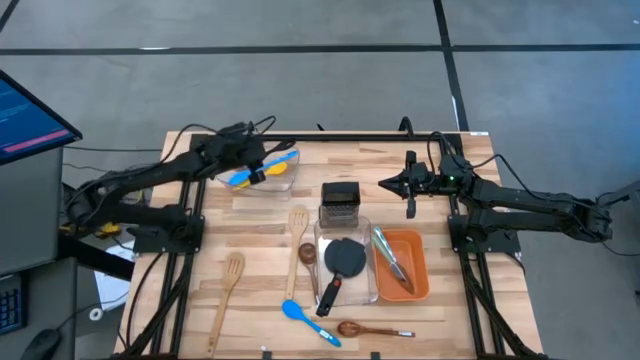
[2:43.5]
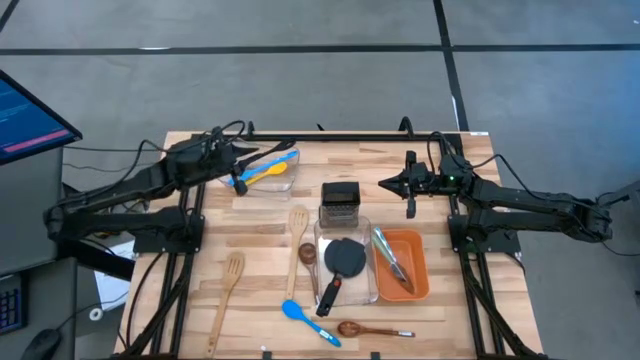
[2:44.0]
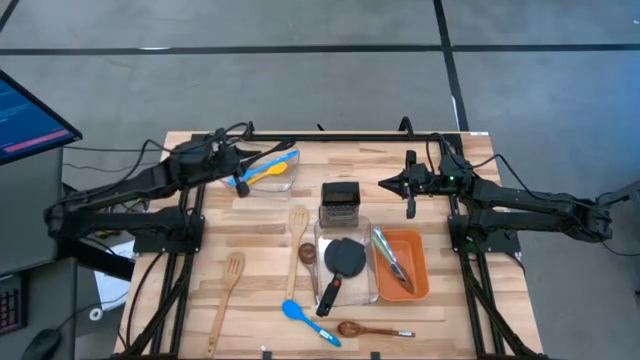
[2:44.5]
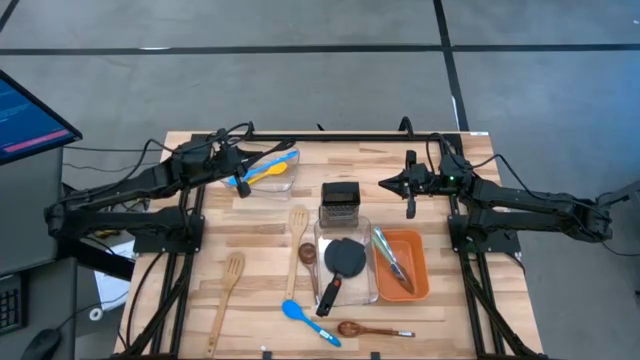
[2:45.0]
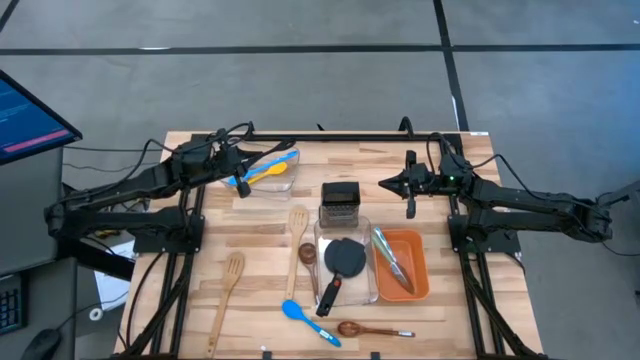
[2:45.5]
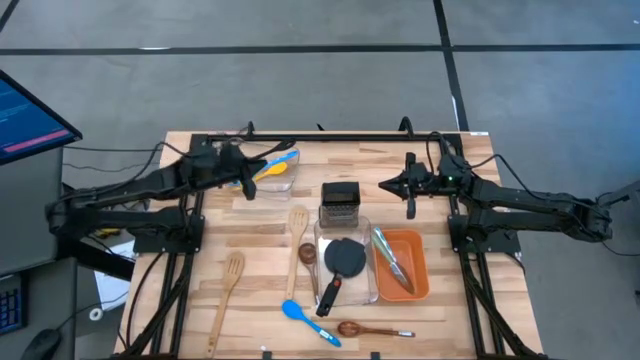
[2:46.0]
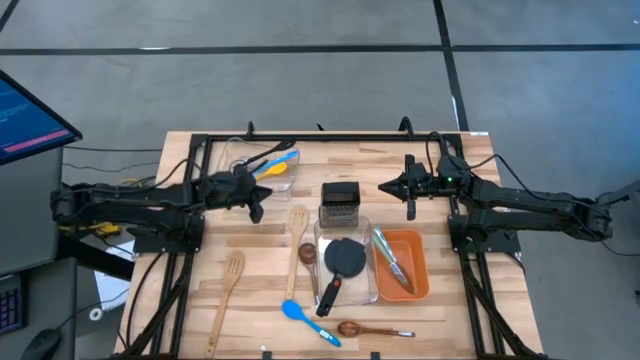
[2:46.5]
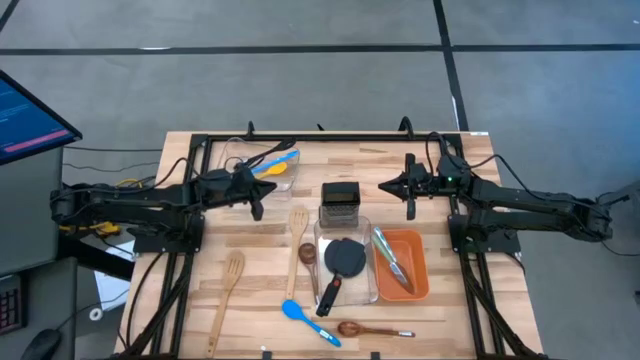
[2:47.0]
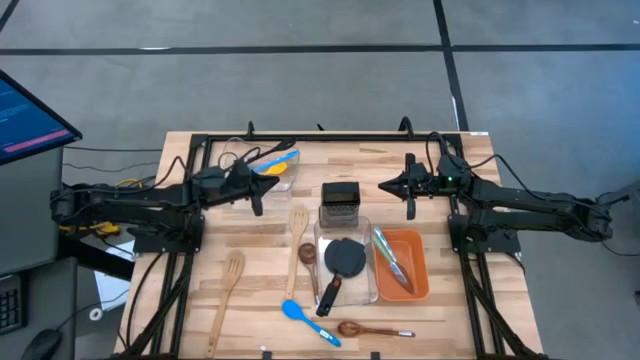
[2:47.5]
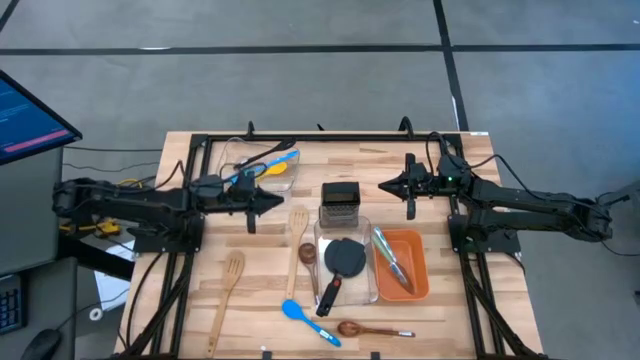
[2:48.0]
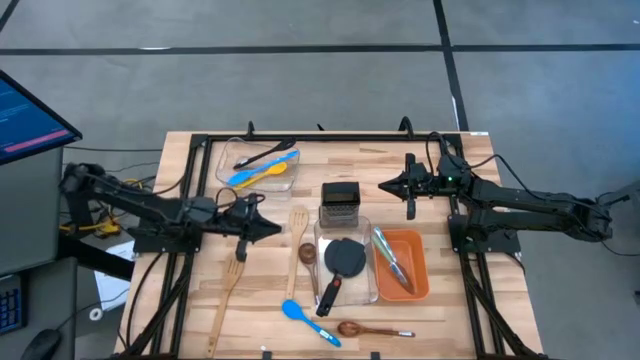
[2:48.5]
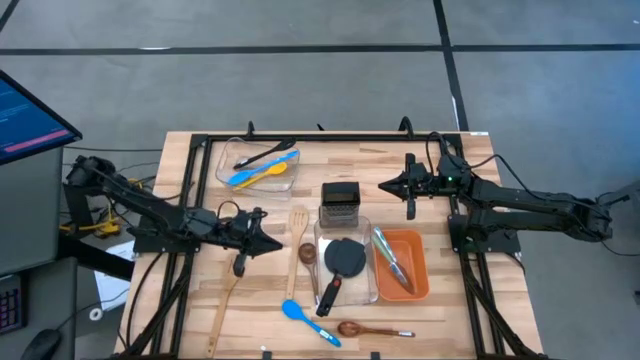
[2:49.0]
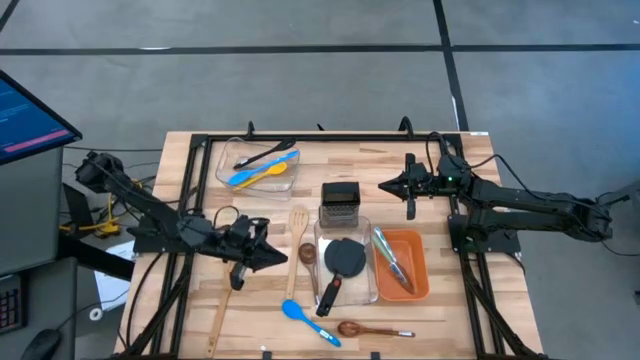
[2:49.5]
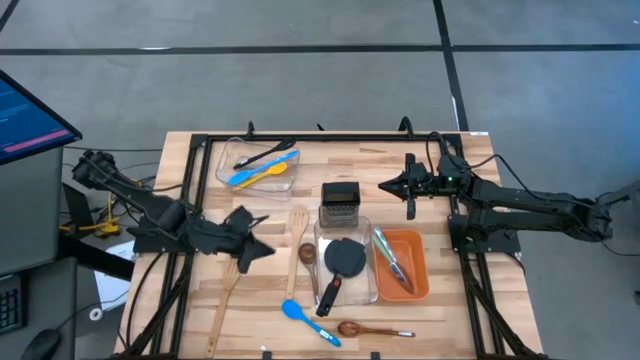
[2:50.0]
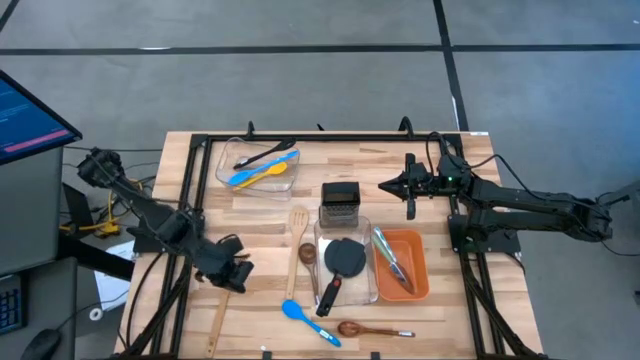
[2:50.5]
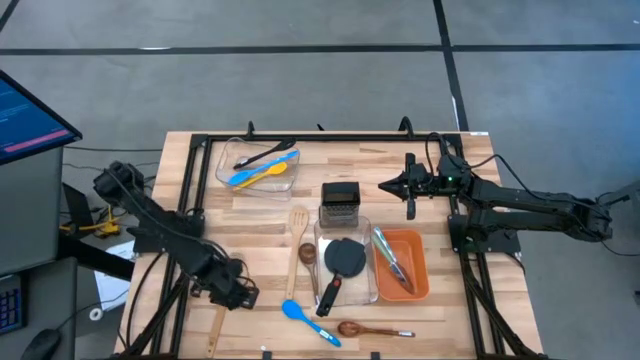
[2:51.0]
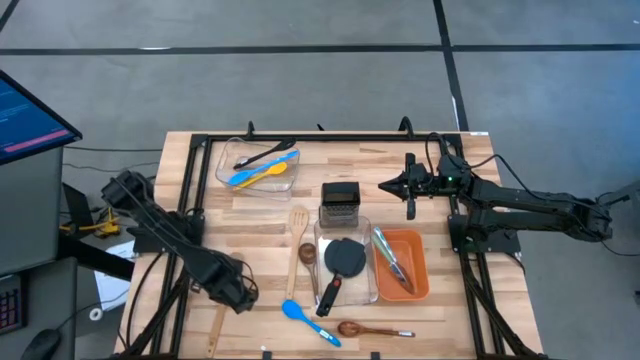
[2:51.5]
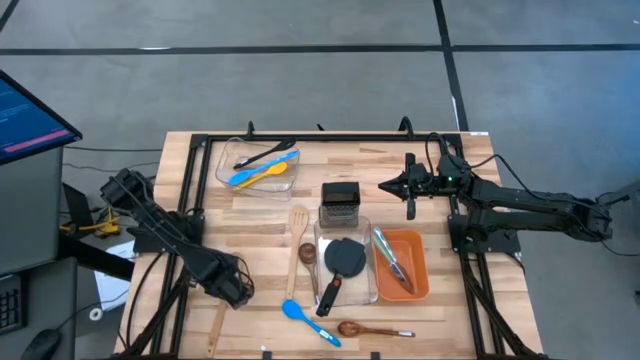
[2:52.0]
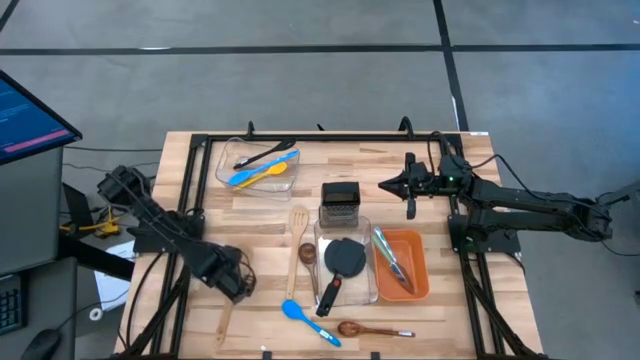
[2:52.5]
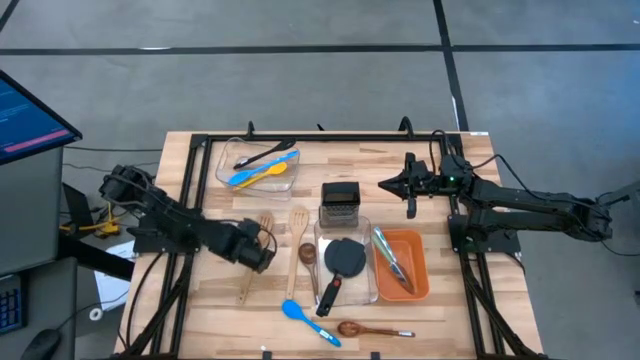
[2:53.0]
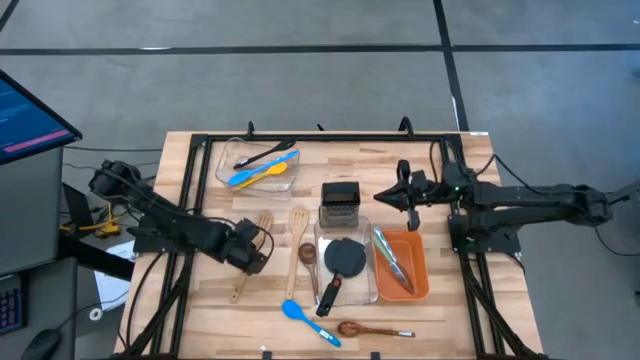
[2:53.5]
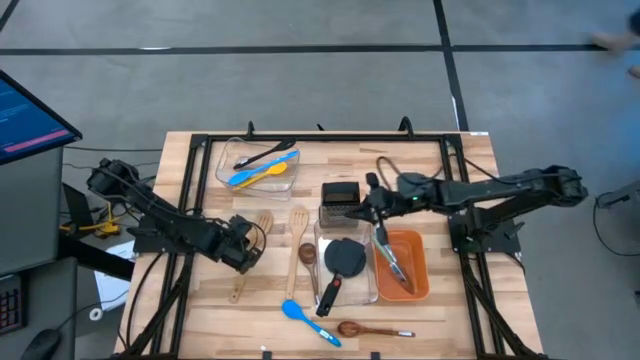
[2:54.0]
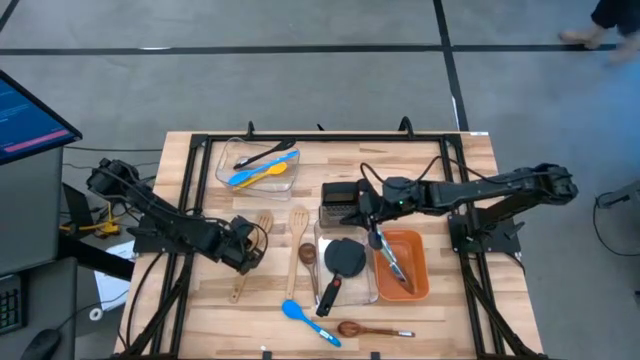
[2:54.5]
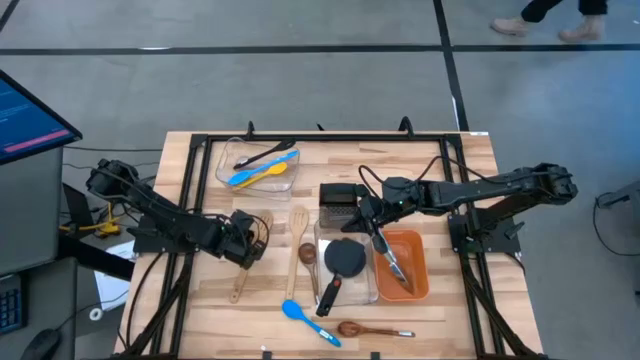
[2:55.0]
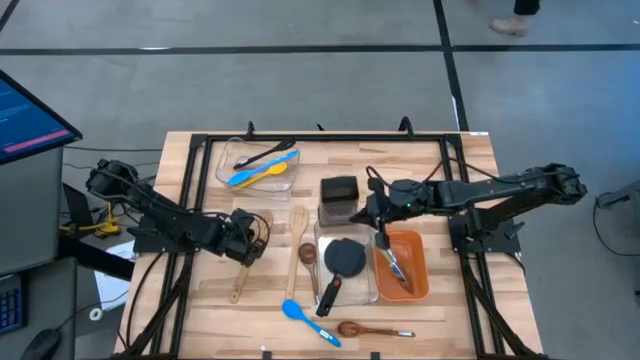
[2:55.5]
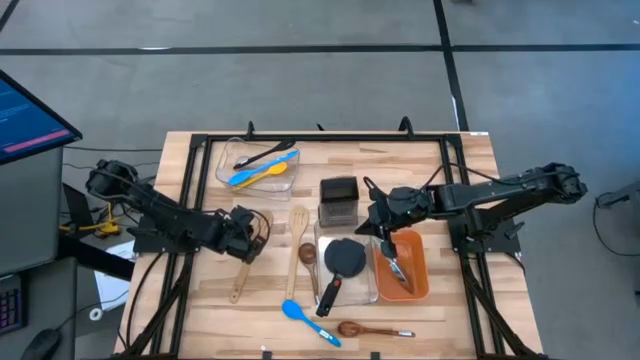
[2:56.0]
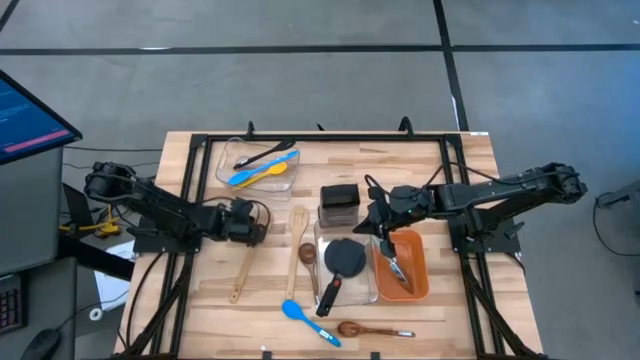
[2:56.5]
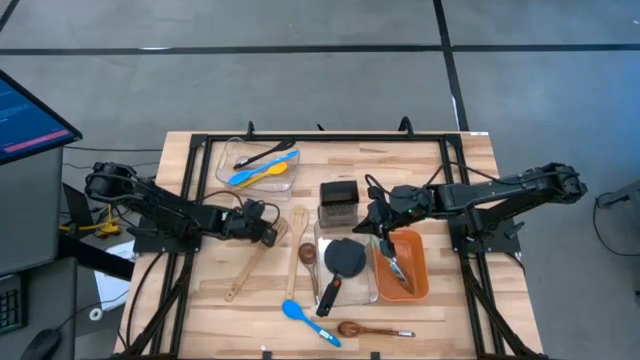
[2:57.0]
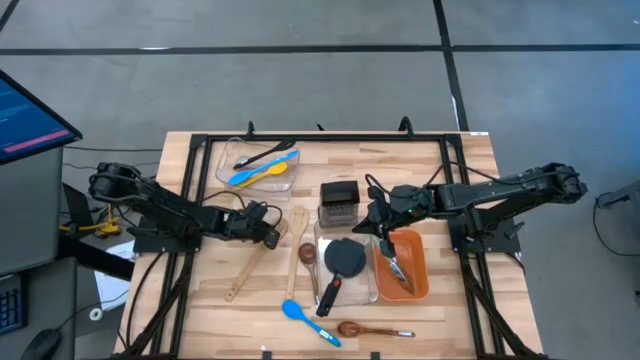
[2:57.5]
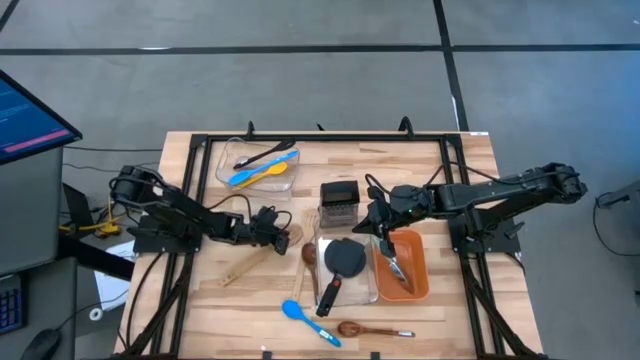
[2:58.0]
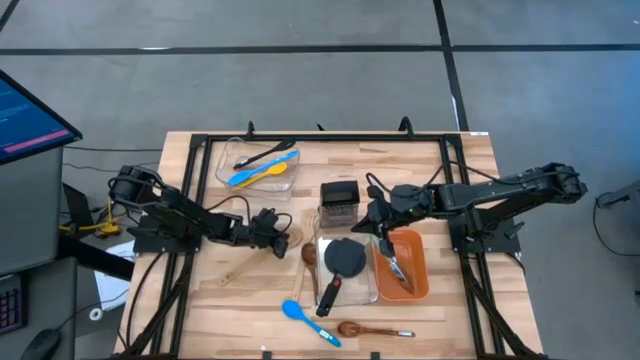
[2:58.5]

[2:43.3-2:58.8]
Task: Pick & Place Kitchen Items
Move the brown wooden ladle to the middle left of the table

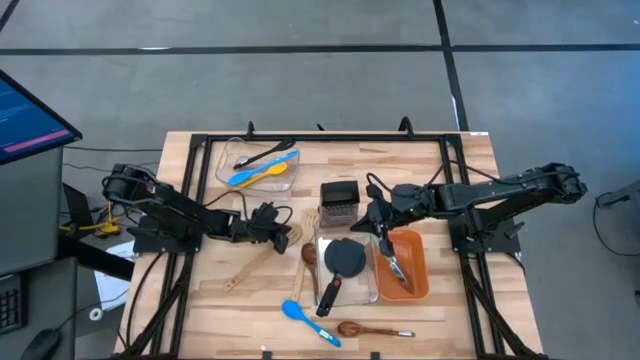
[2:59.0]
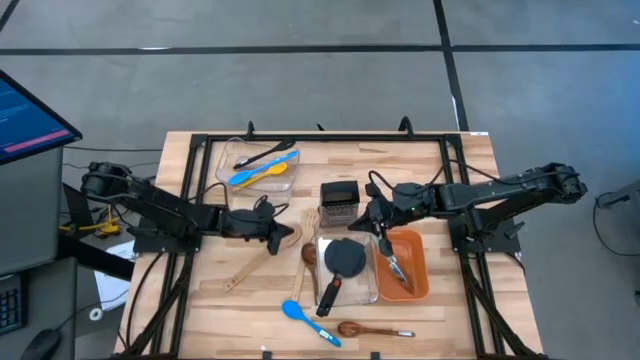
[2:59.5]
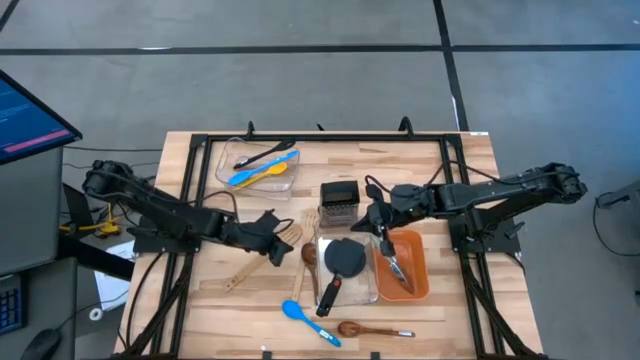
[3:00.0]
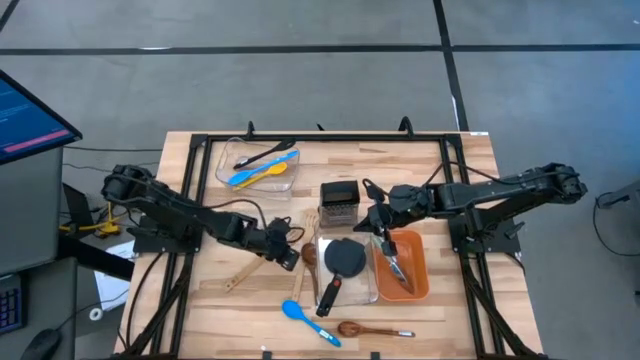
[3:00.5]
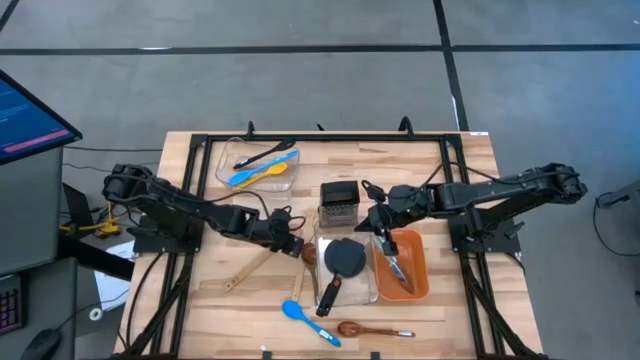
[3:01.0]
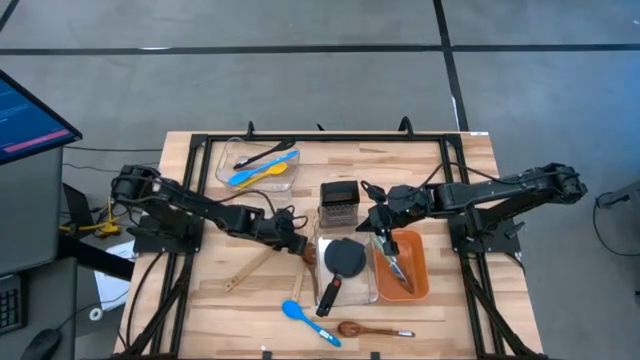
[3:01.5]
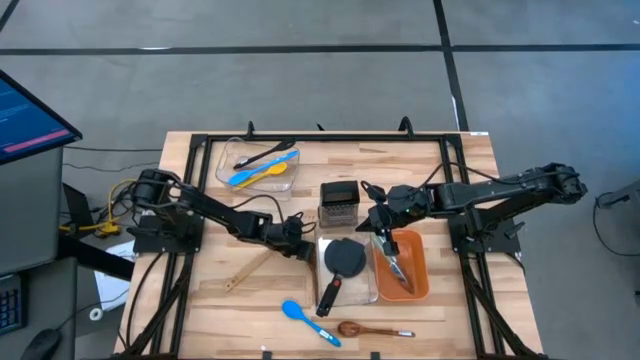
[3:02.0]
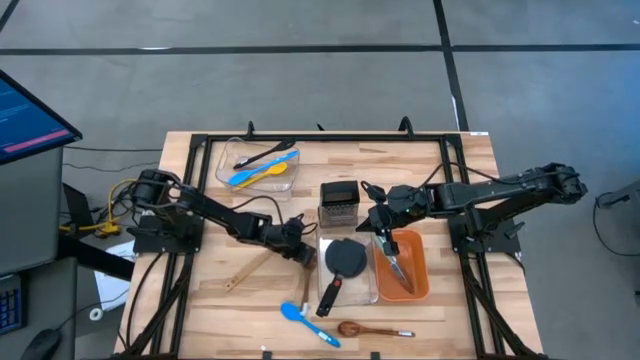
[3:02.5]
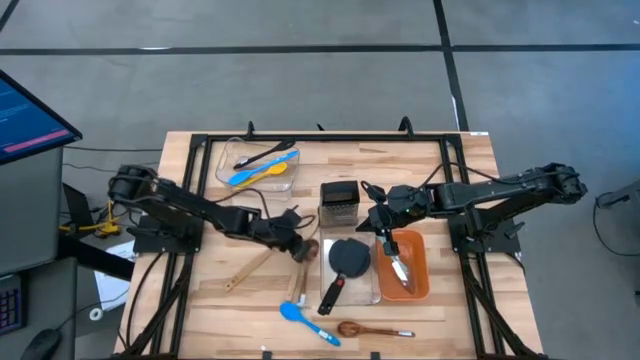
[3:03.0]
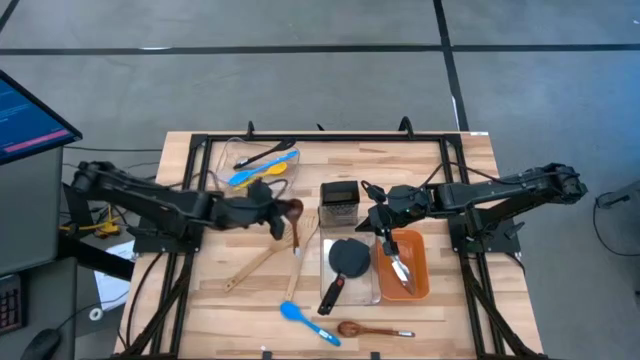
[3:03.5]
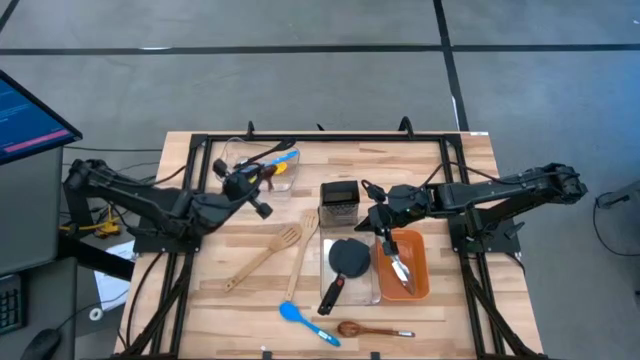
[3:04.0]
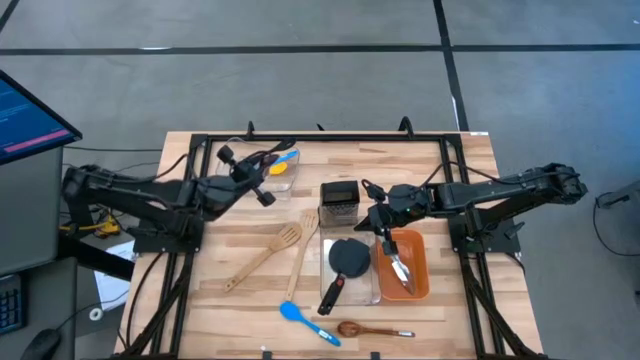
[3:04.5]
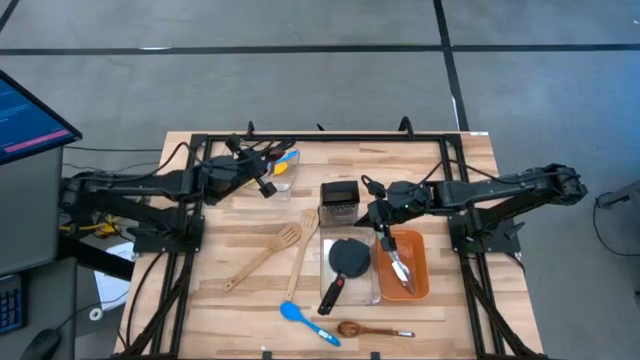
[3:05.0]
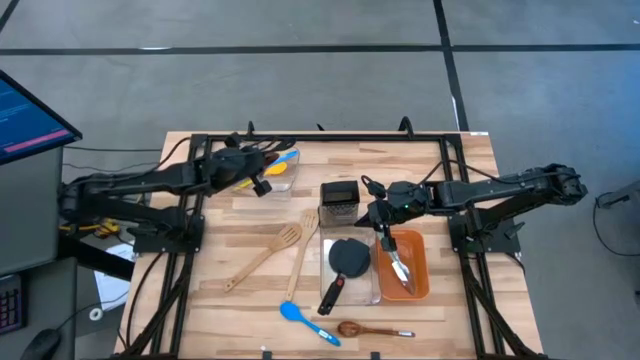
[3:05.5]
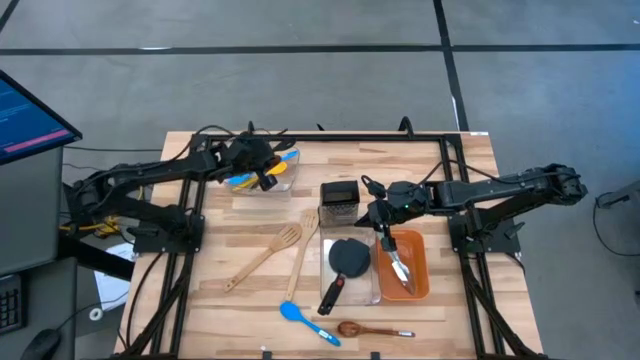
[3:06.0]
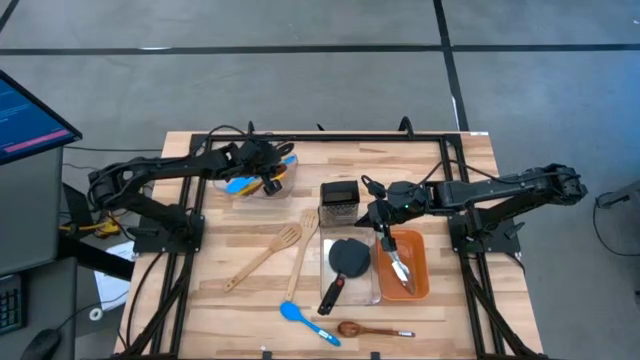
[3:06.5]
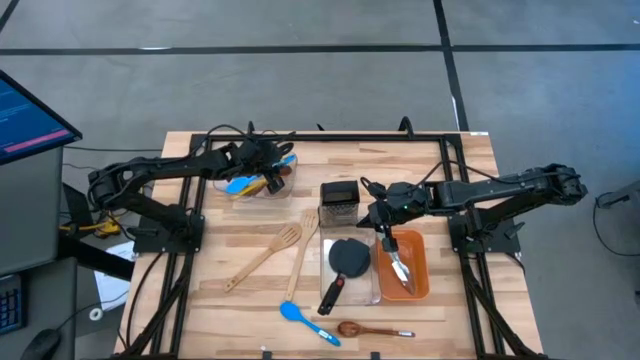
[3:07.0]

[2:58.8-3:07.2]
Put the brown ladle into the top transparent bin
